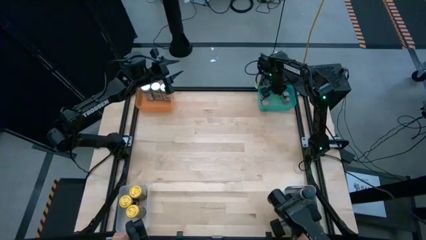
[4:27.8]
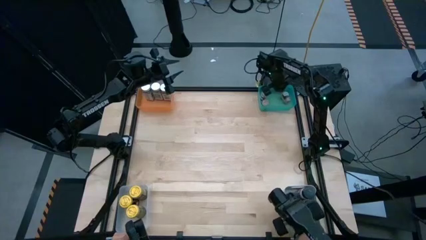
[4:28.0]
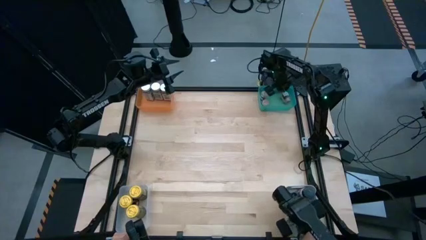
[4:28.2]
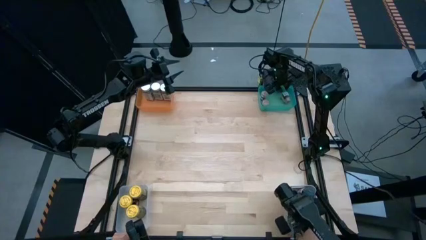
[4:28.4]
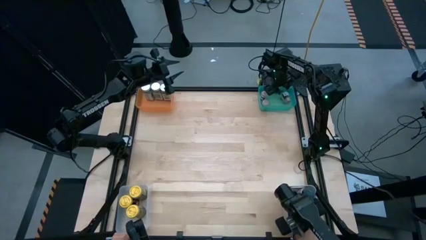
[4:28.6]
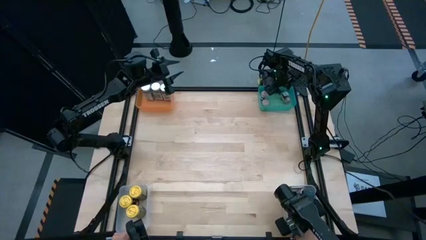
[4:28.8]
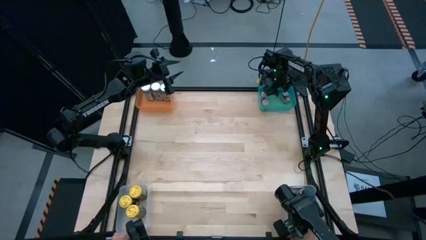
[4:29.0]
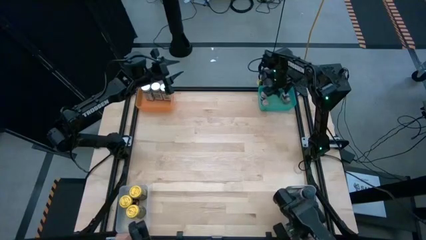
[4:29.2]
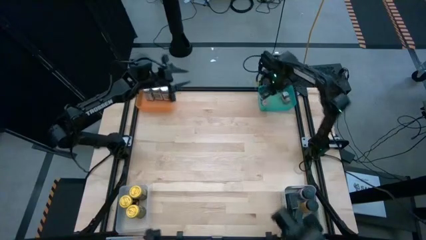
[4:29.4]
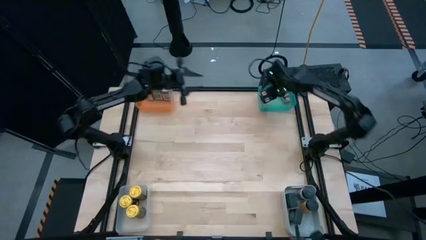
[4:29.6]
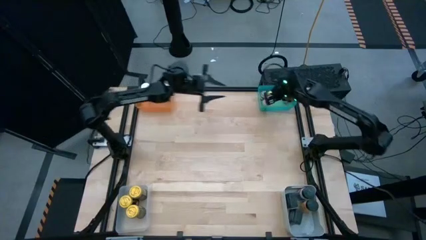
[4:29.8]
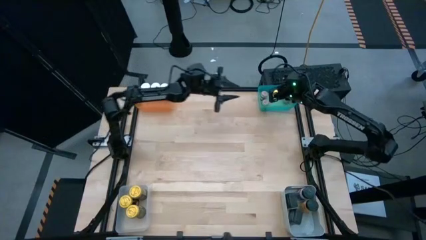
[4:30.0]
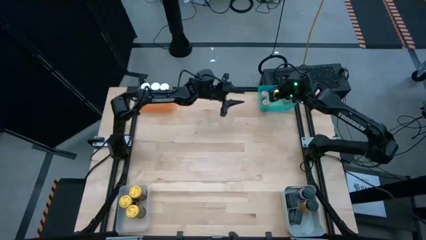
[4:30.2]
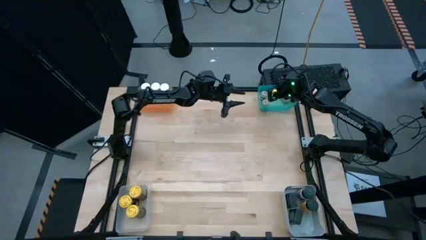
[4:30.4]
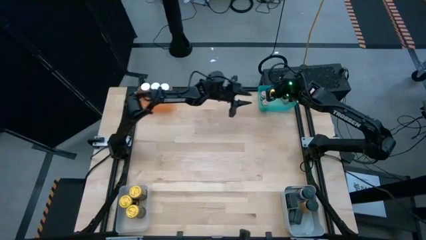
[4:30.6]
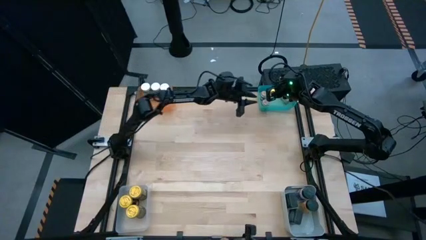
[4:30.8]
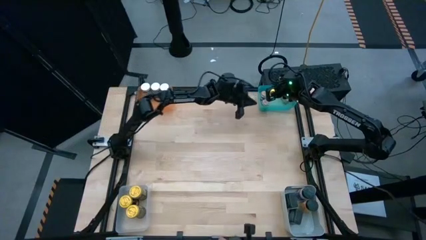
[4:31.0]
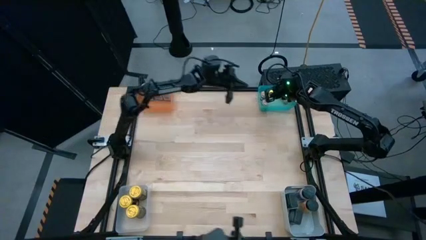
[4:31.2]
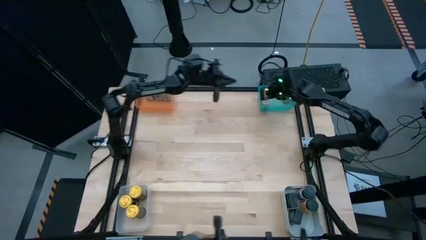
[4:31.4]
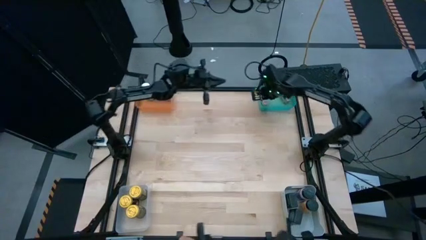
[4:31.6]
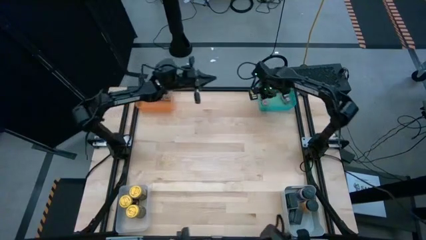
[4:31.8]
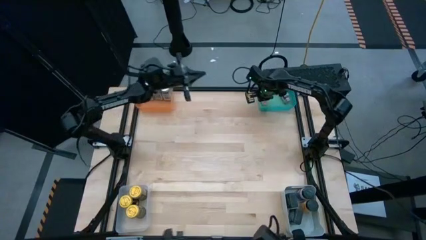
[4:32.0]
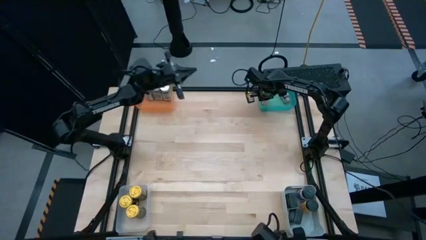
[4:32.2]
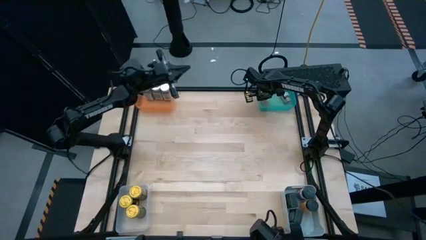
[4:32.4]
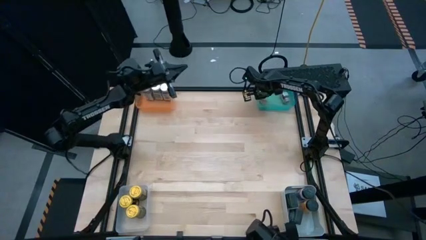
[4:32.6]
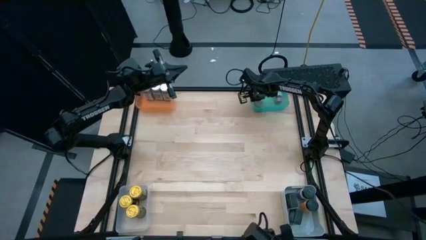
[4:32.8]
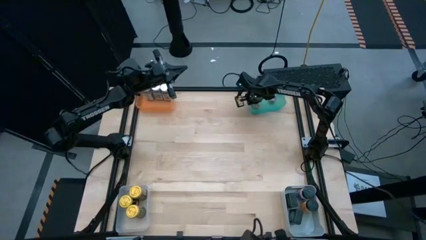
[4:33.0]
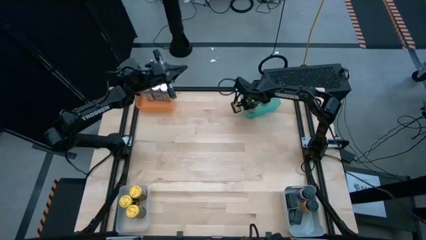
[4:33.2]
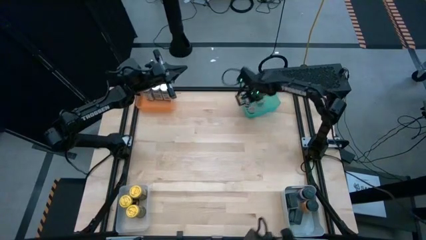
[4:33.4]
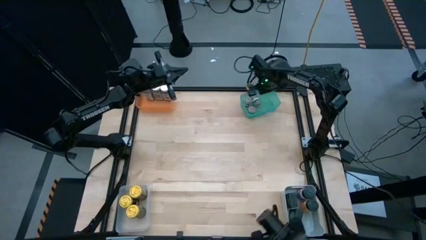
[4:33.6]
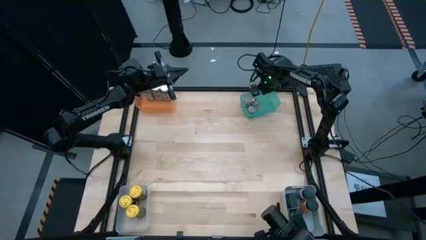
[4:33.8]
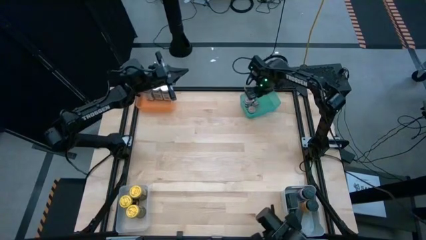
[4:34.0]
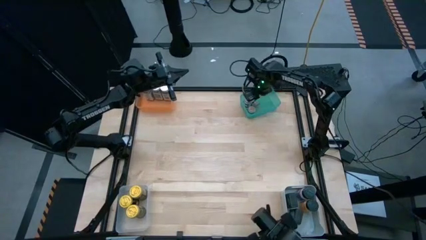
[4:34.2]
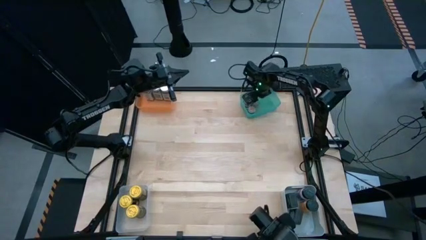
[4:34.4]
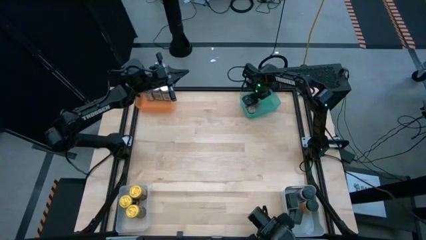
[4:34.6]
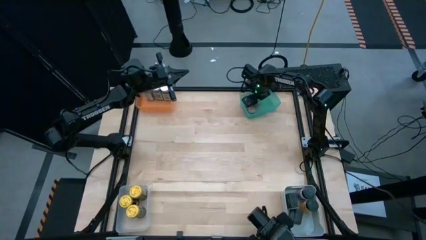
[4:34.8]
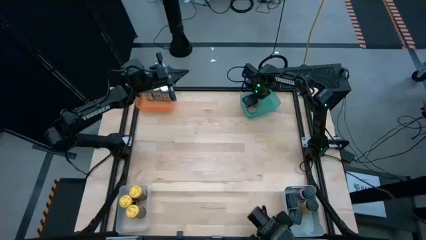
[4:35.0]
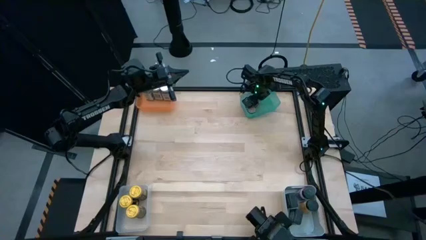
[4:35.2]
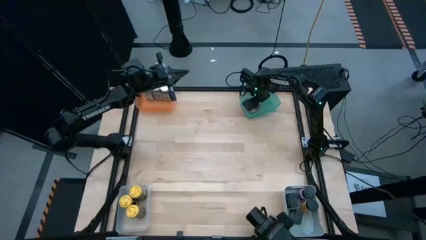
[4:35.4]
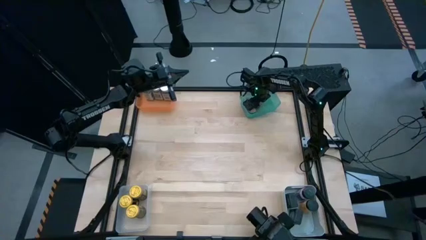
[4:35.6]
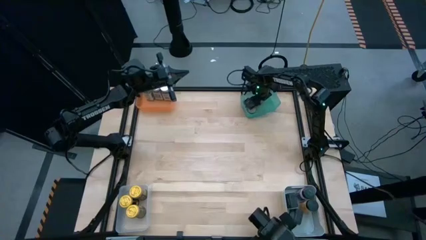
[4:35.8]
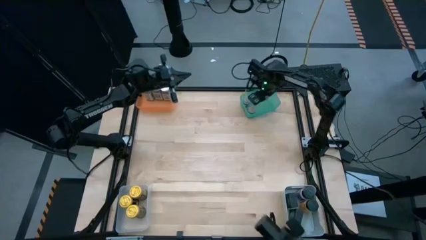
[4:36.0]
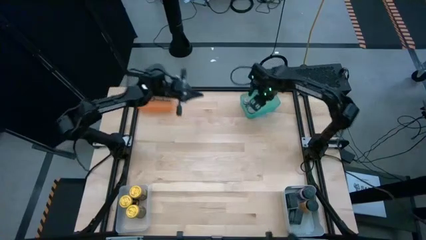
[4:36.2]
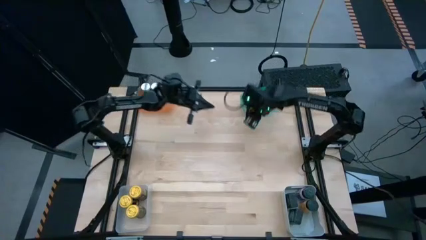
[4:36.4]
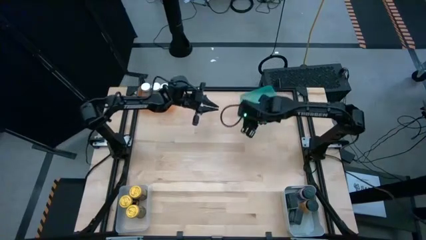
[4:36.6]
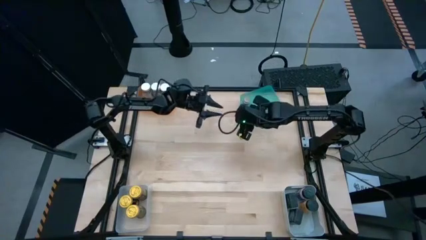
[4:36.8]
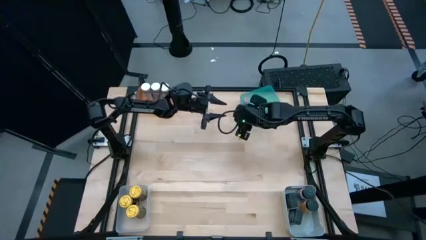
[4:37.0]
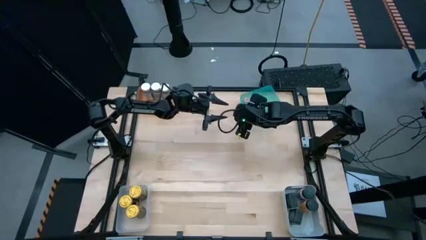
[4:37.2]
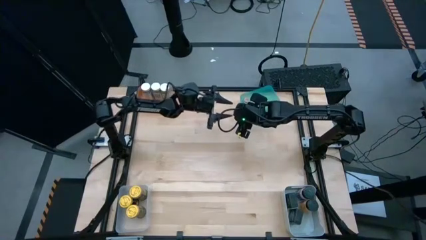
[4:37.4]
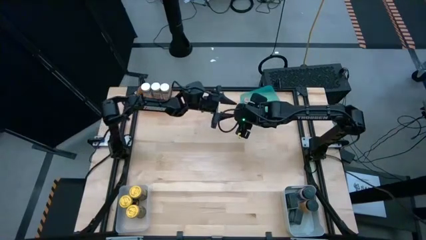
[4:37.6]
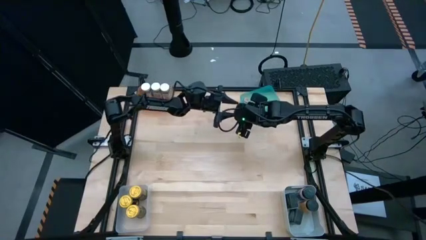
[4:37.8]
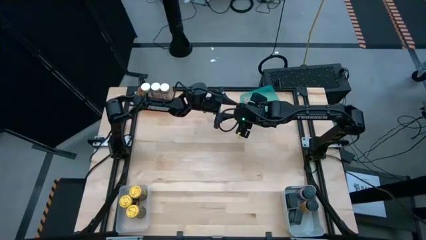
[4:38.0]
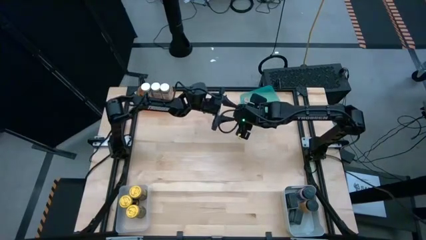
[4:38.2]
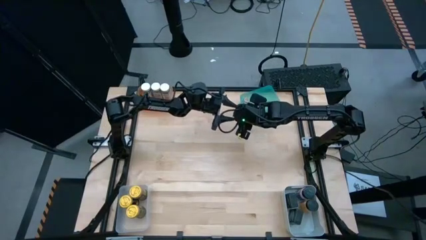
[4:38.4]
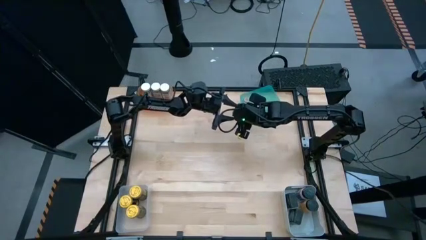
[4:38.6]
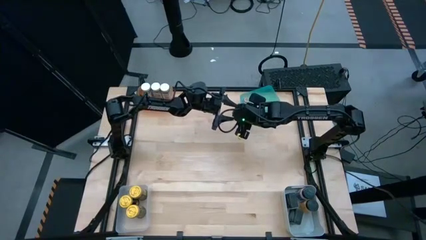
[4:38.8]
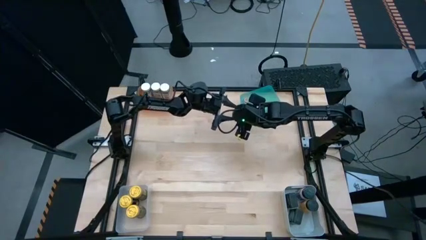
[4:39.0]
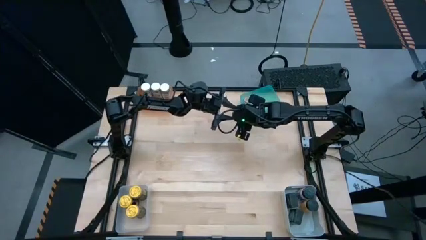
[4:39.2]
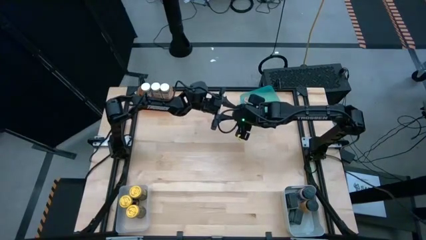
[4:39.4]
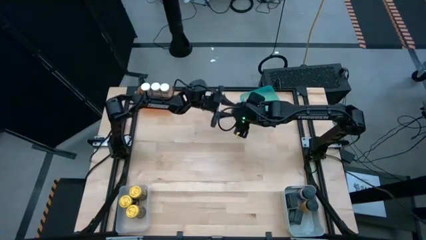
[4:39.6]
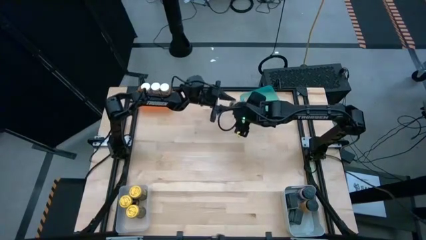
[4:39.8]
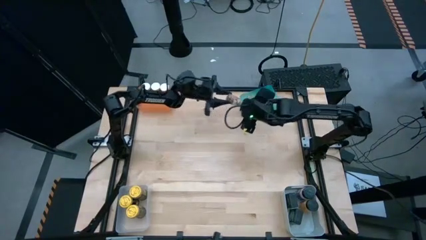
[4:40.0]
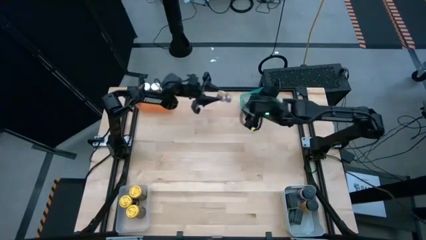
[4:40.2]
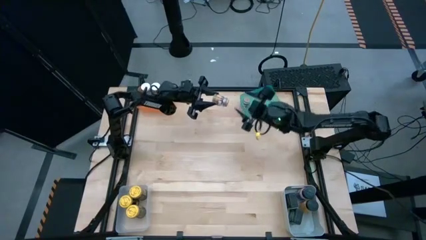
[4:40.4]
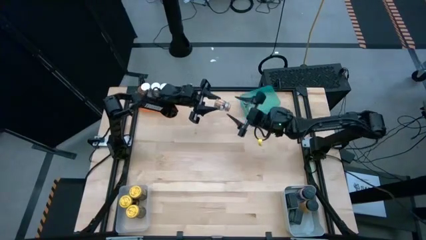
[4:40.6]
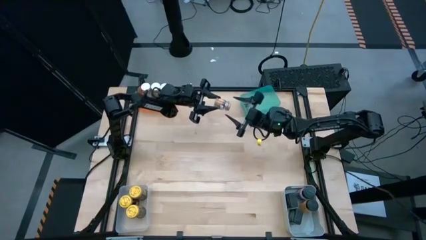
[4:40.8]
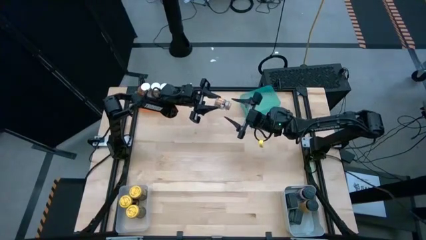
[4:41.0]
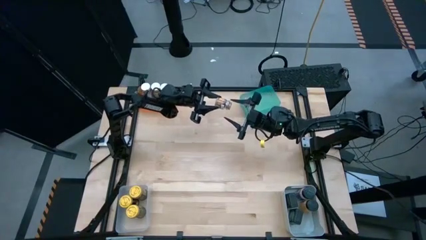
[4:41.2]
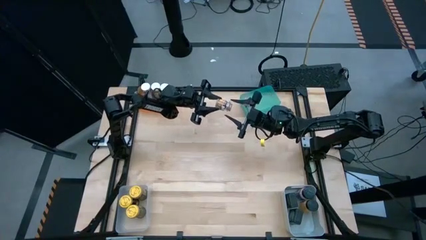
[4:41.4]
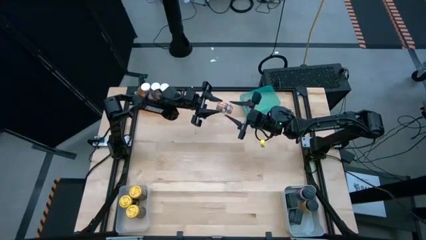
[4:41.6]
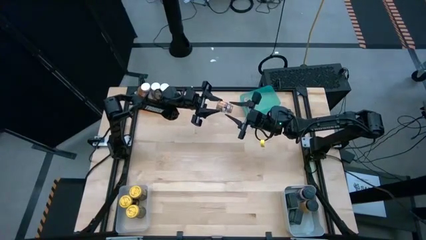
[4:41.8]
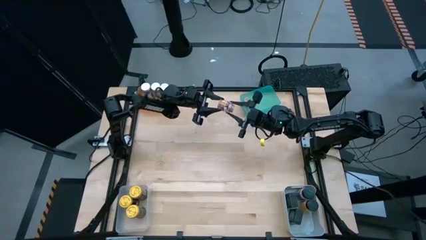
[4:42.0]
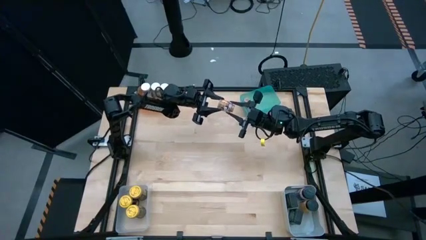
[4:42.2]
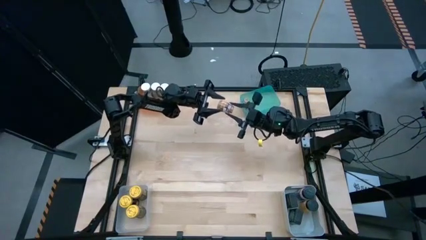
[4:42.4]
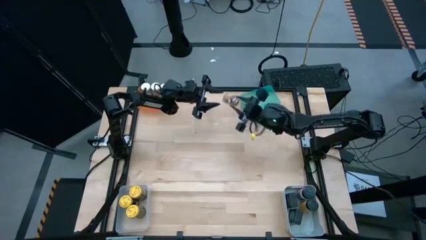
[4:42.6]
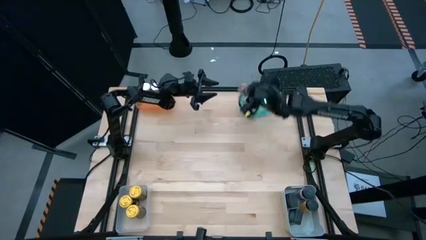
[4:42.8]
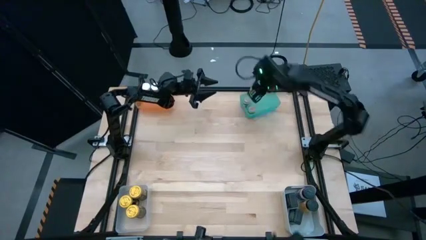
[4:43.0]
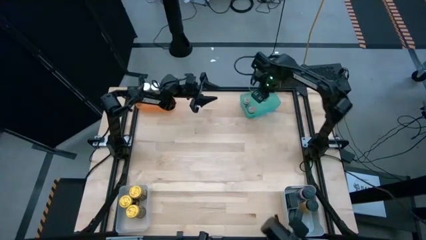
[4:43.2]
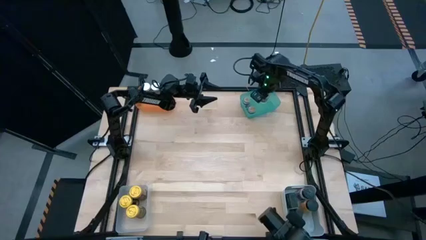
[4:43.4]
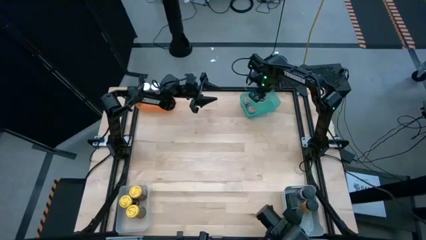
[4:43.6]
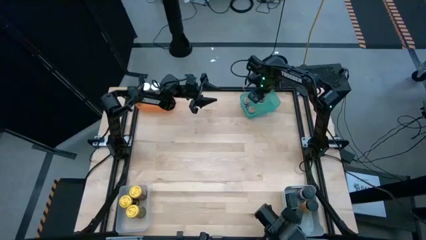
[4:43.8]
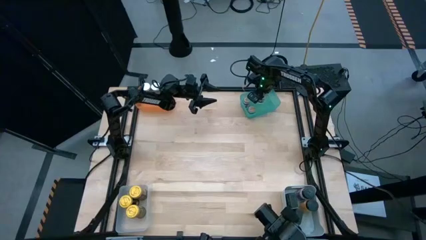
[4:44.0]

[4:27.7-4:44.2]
Task: Sort spices by type
Put the brown seasoning bottle into the blue bin
